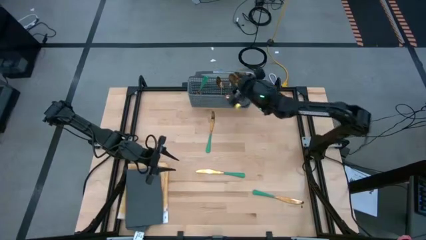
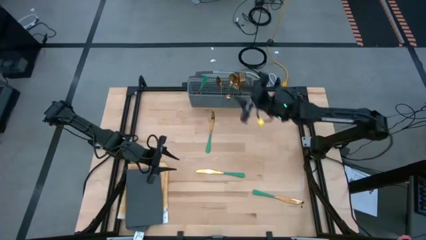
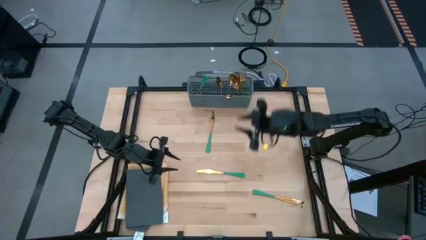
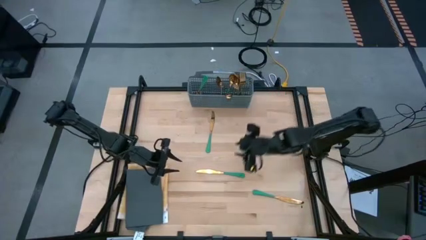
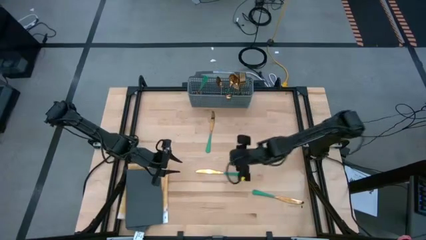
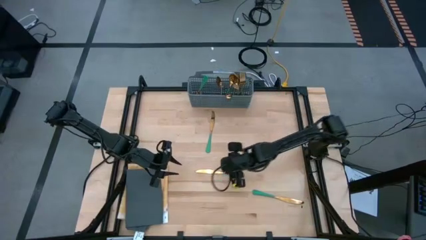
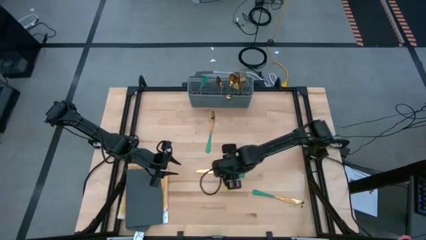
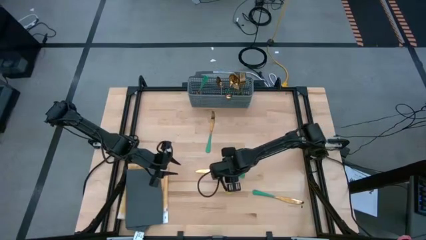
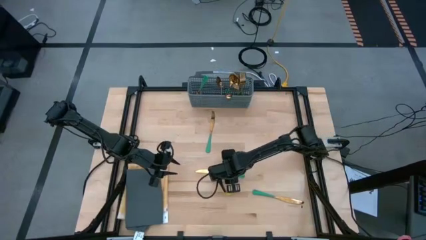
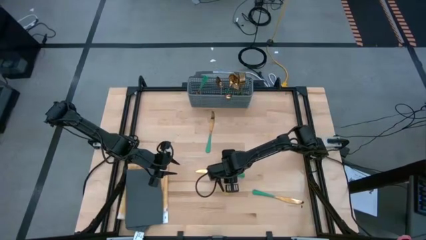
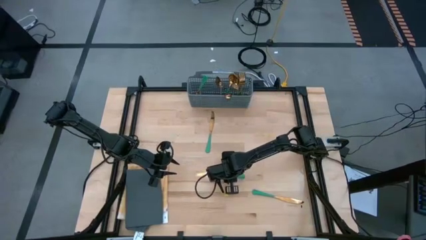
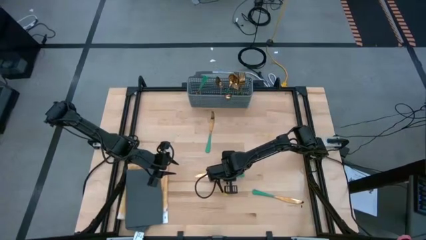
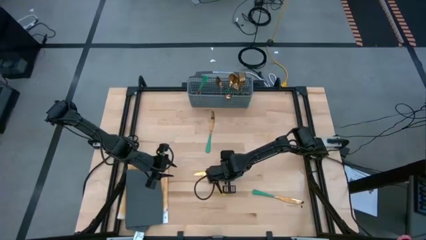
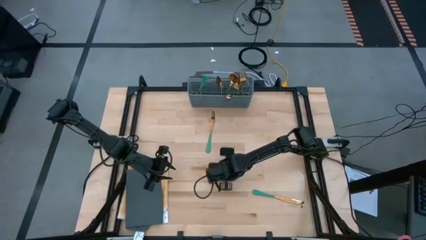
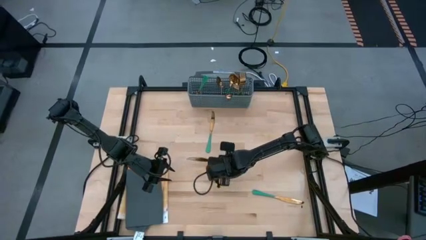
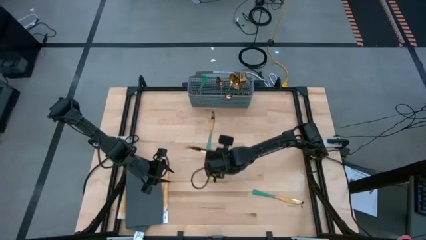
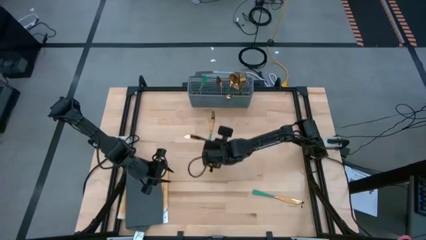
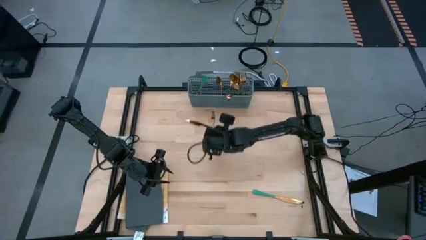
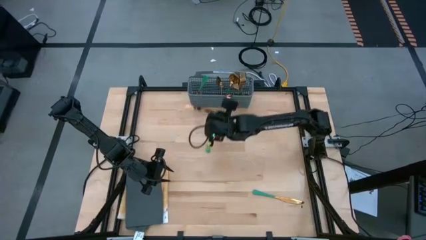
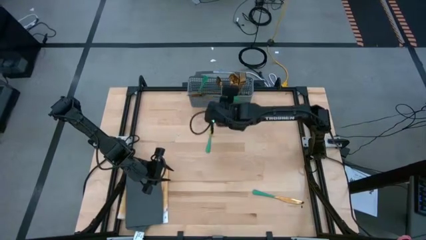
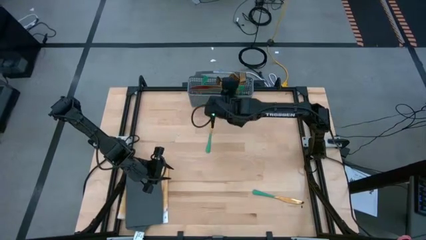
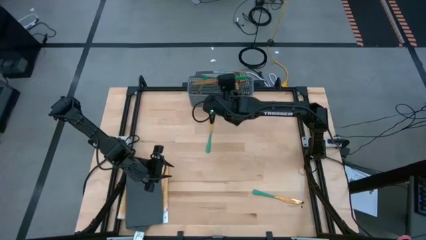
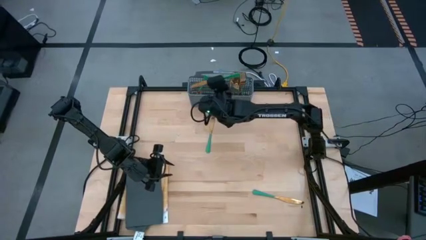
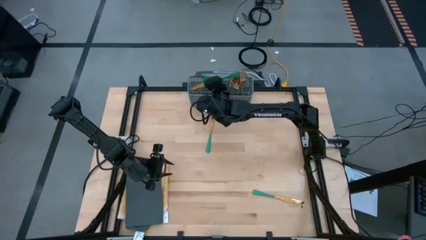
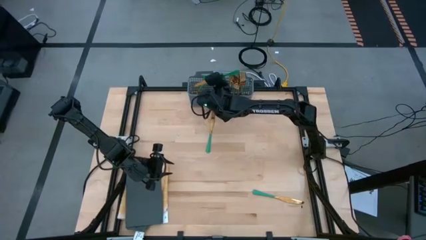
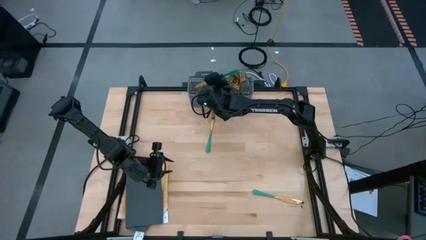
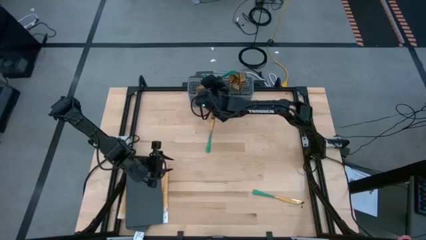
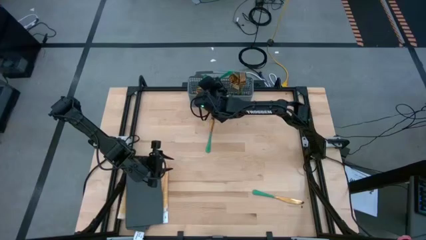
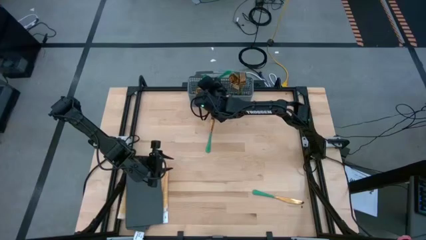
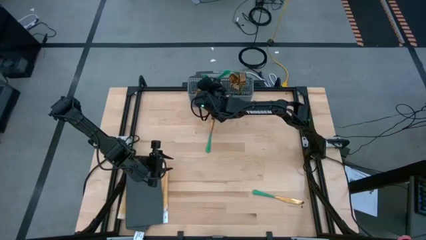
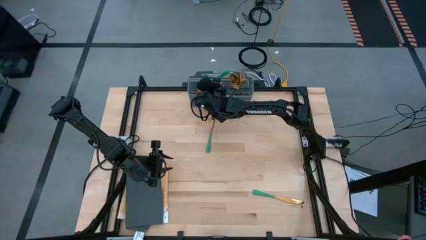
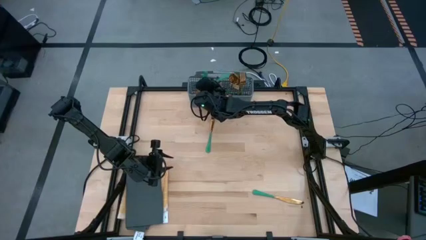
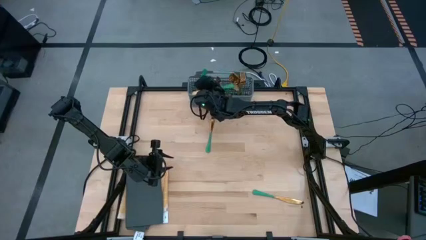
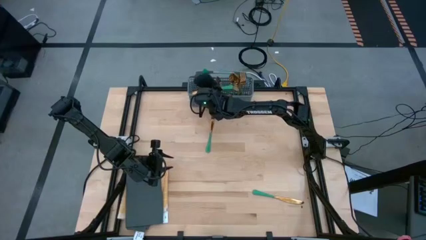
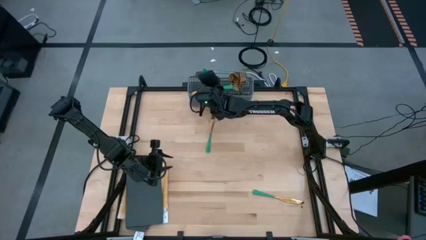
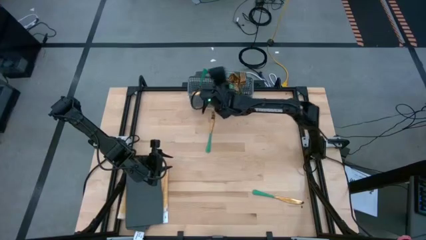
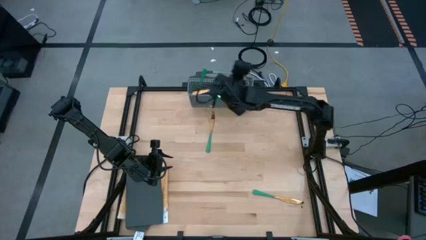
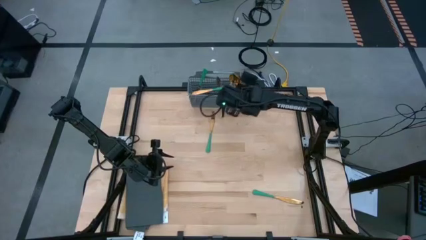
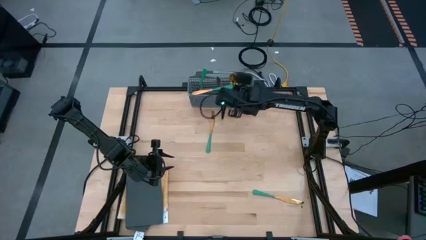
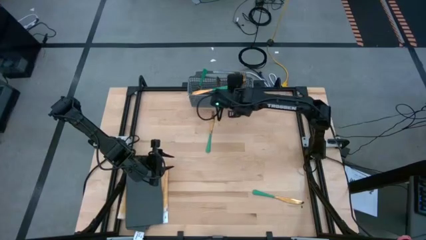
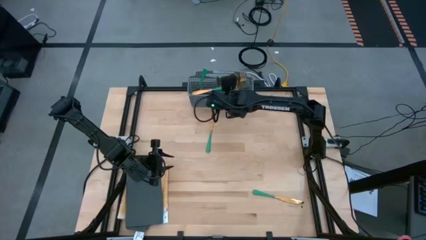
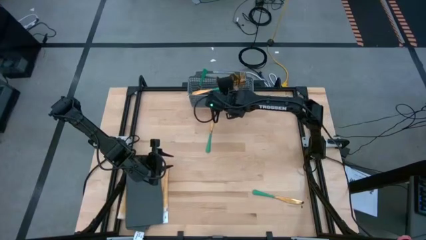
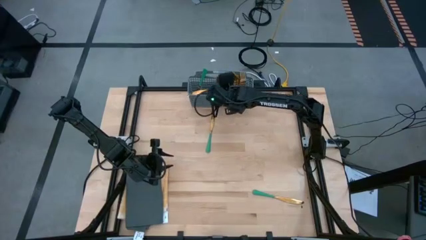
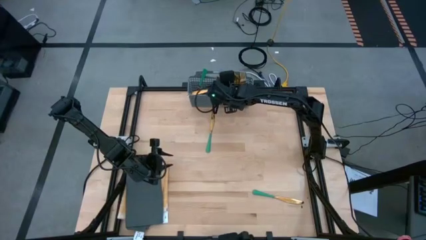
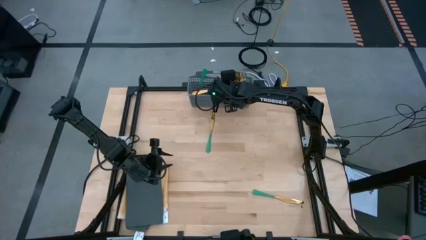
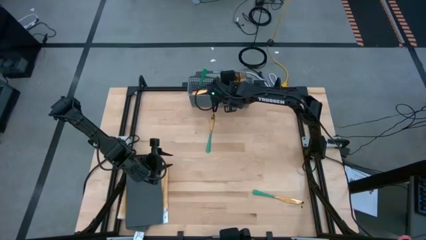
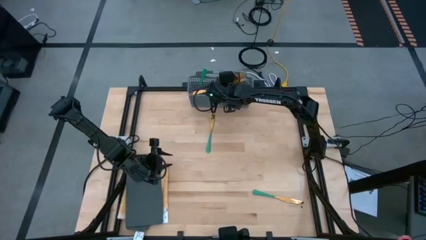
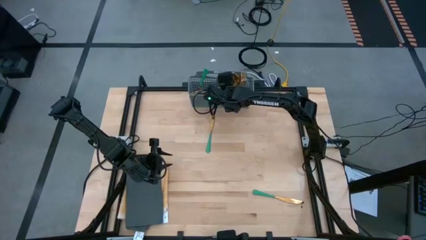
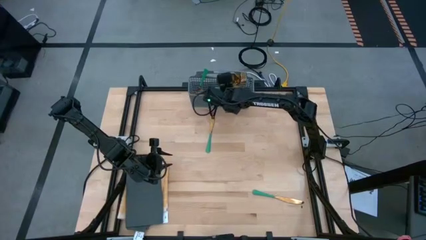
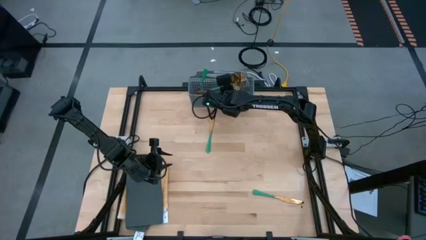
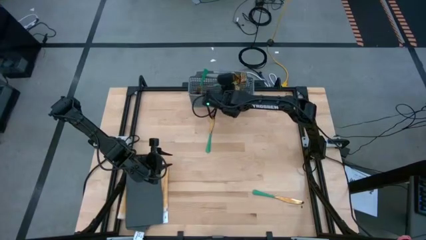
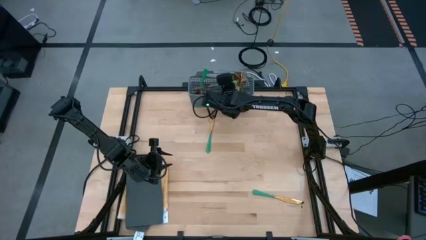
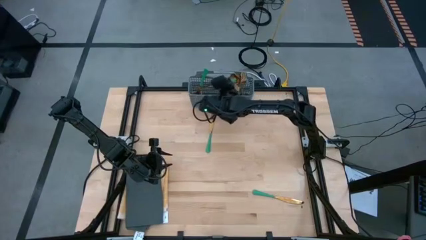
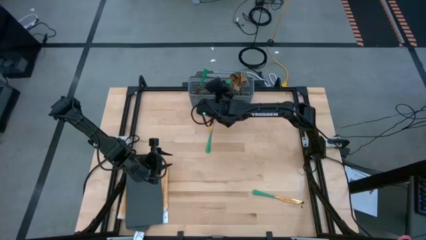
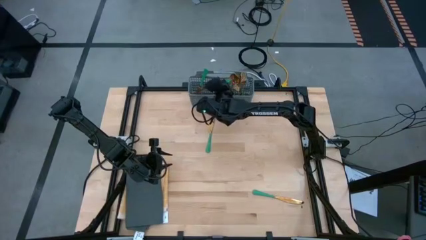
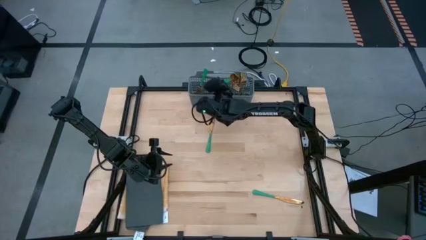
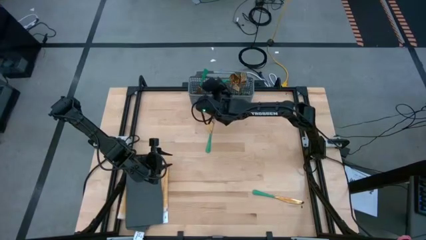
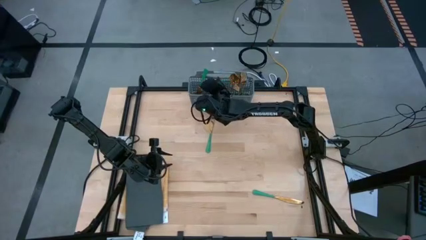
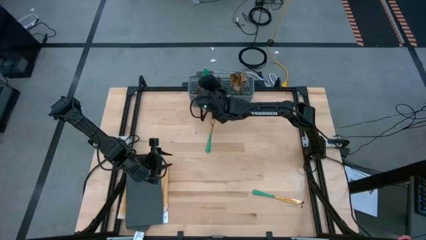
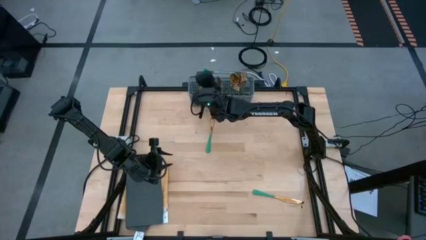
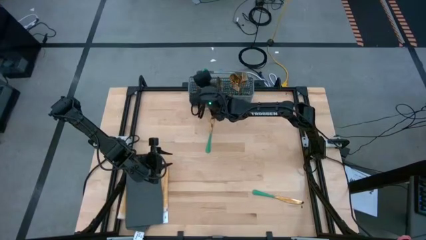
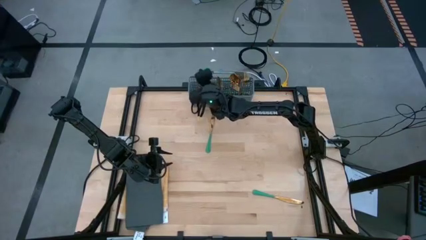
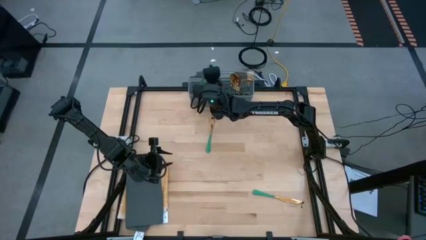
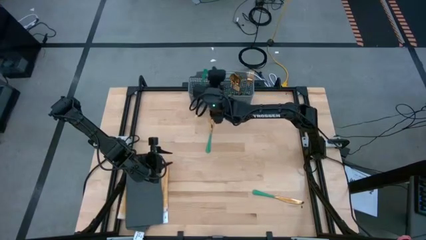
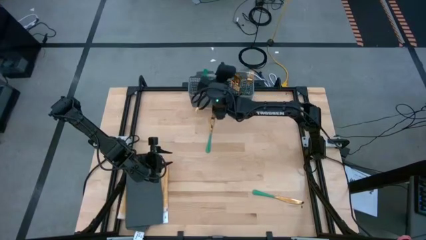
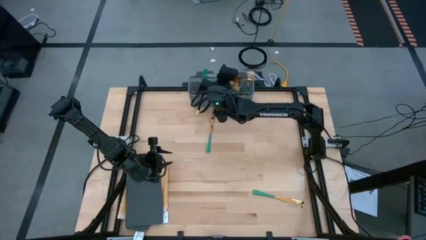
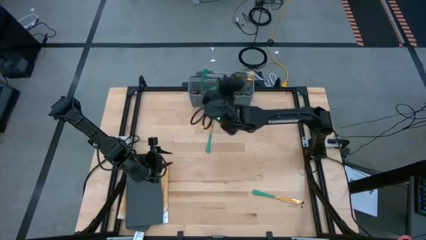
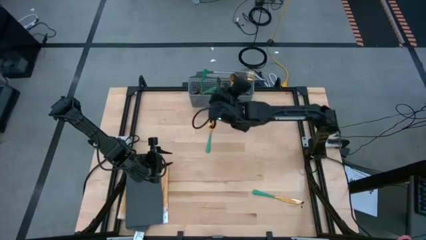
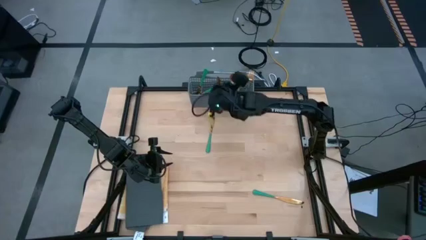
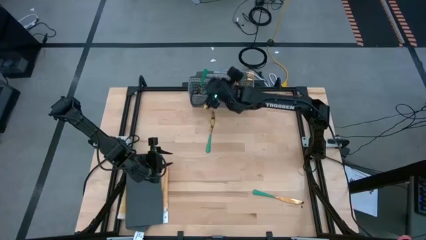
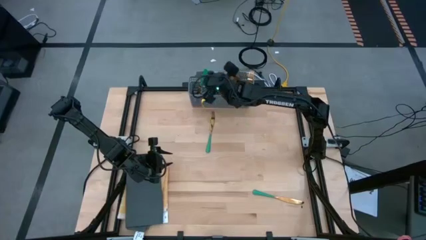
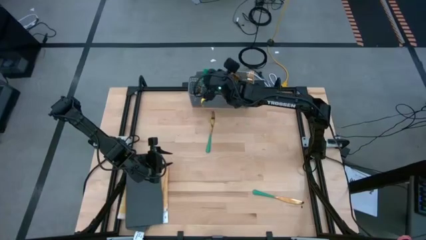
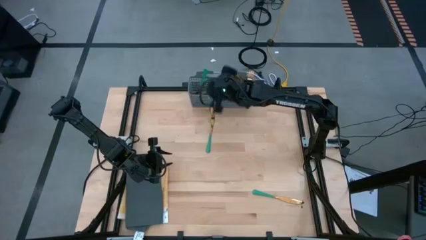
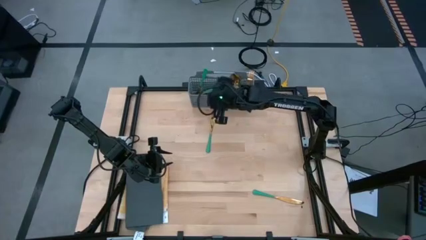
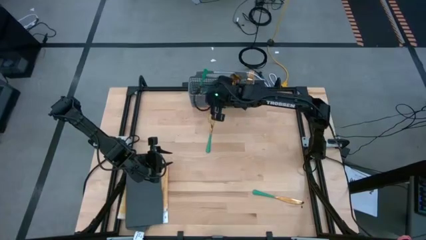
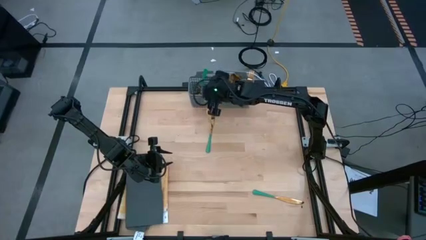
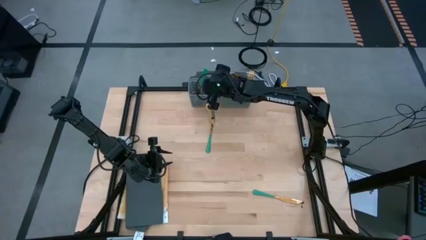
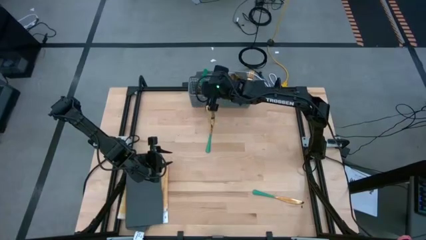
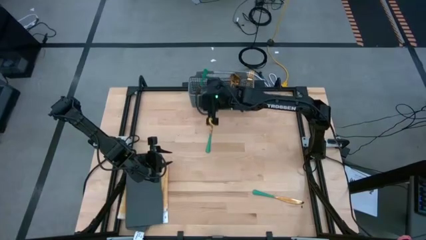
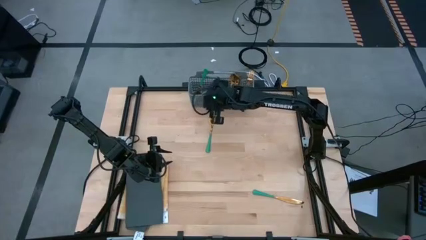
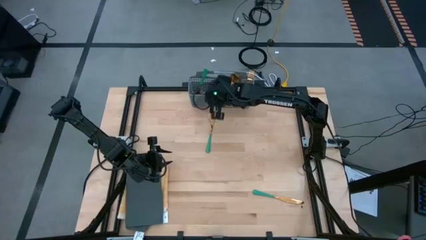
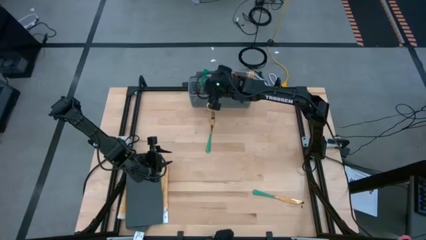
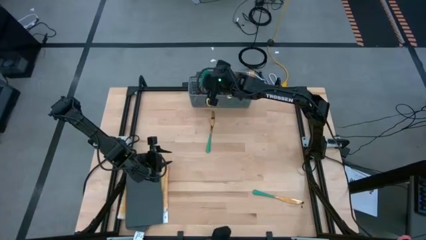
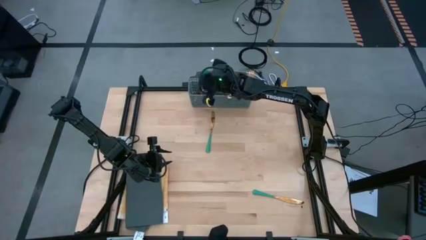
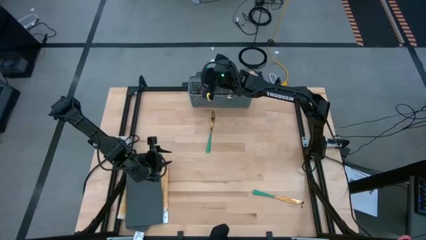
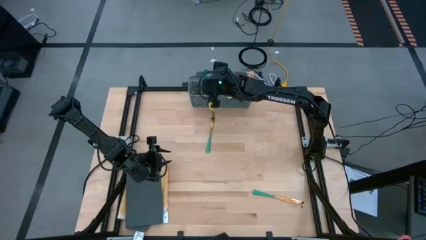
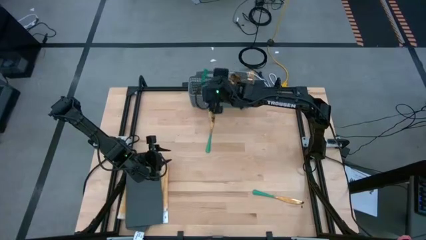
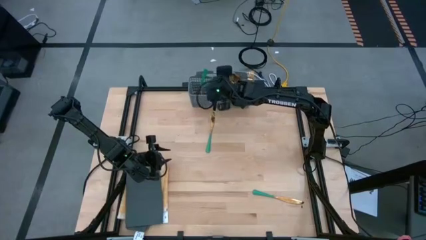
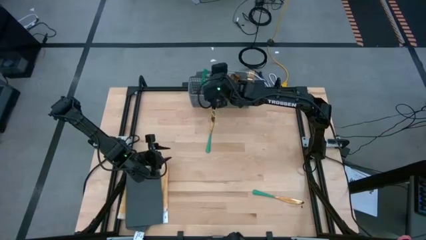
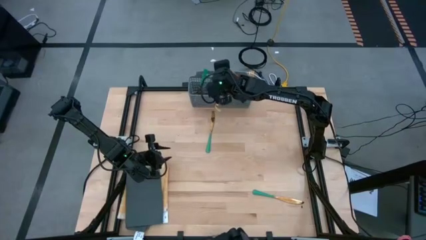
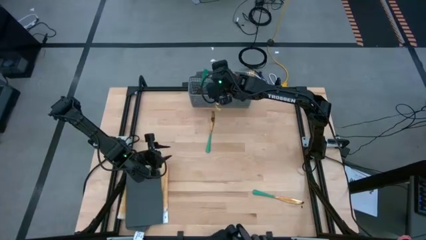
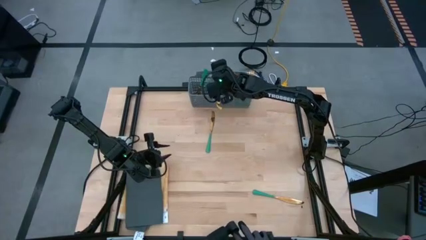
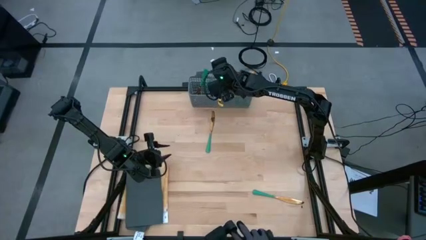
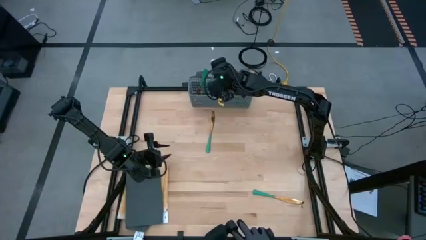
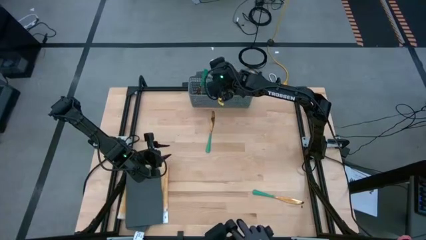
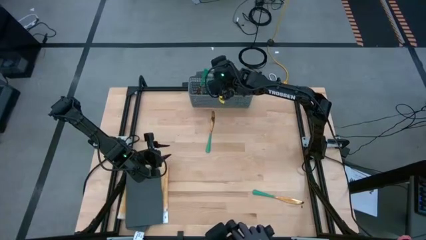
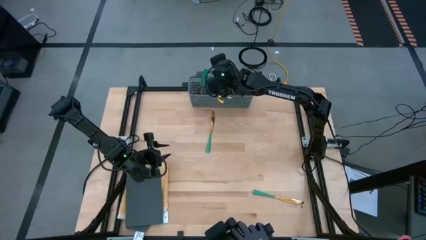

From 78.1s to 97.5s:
Task: Sort silverware
Put the green knife into the gray silverware holder
